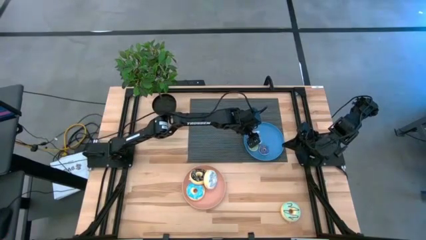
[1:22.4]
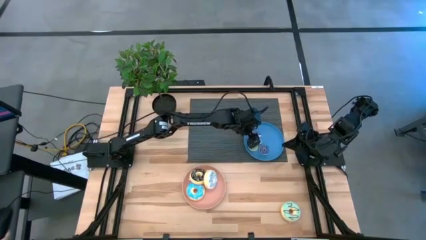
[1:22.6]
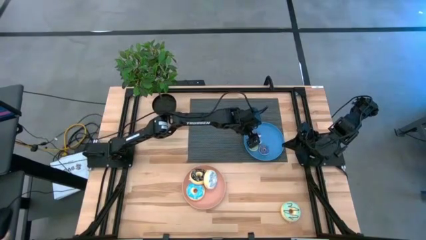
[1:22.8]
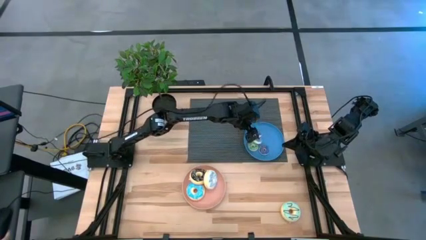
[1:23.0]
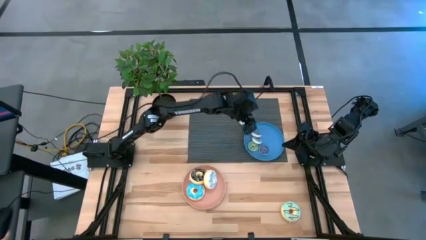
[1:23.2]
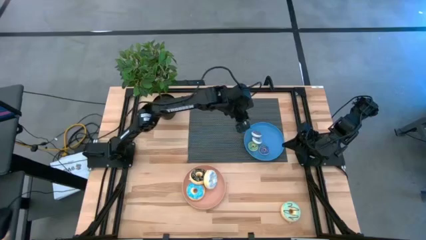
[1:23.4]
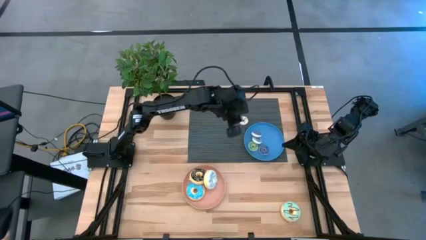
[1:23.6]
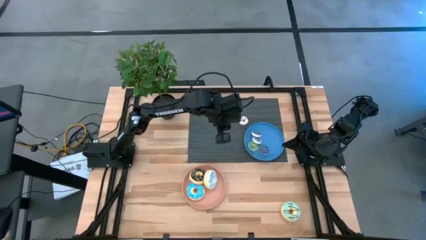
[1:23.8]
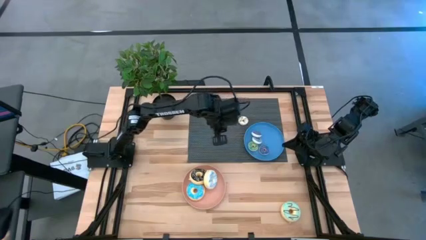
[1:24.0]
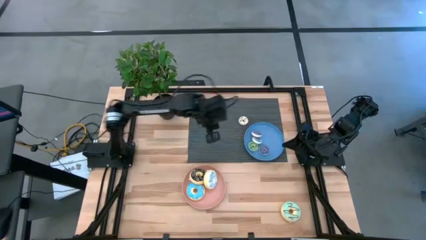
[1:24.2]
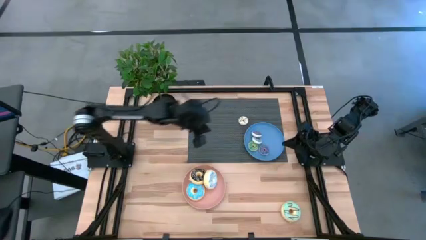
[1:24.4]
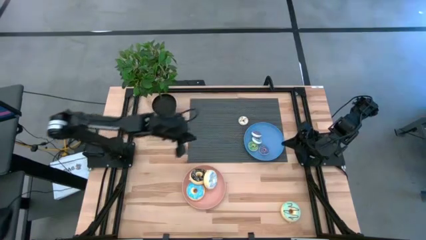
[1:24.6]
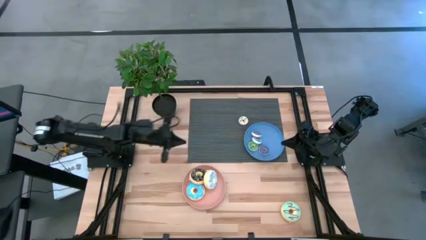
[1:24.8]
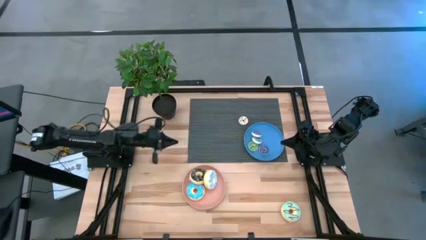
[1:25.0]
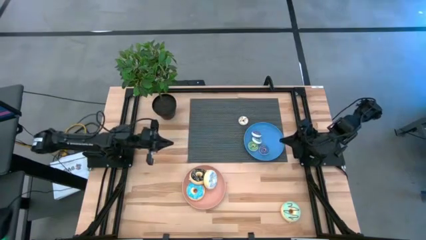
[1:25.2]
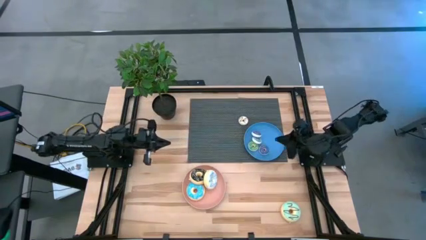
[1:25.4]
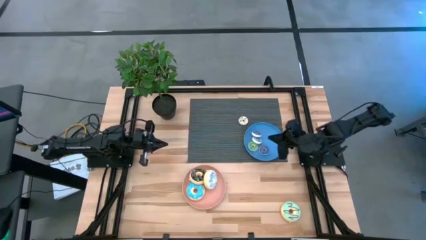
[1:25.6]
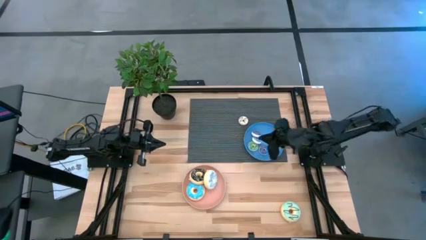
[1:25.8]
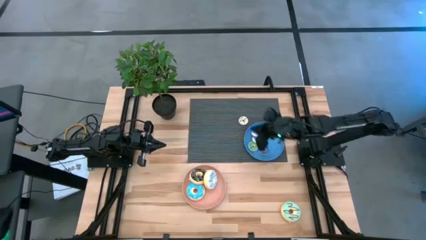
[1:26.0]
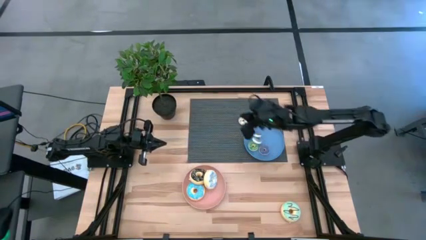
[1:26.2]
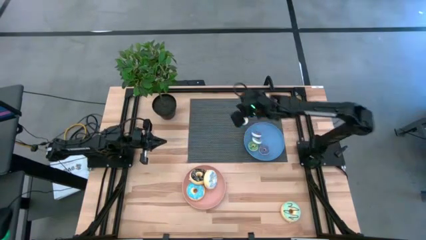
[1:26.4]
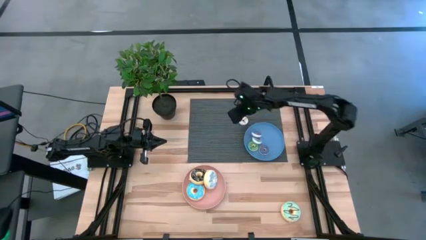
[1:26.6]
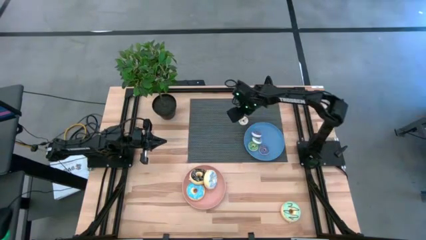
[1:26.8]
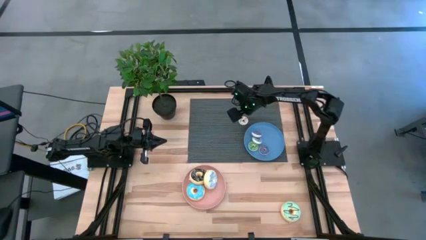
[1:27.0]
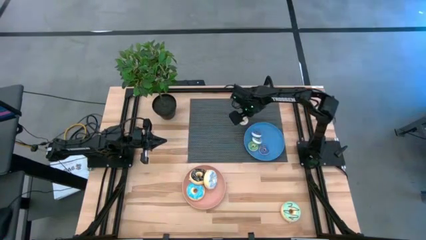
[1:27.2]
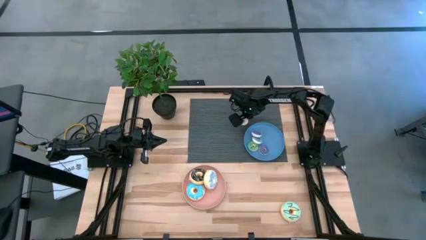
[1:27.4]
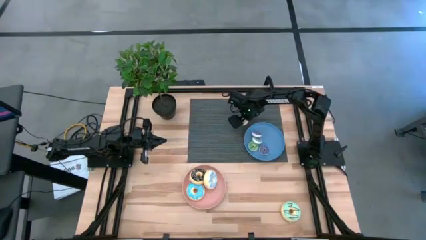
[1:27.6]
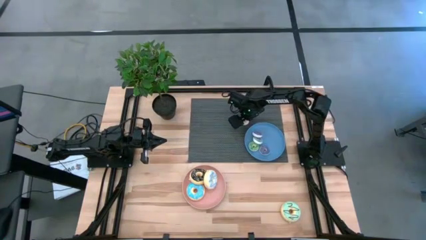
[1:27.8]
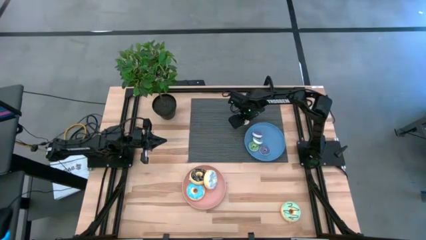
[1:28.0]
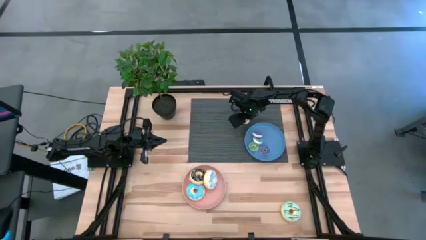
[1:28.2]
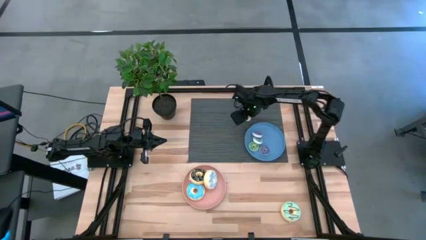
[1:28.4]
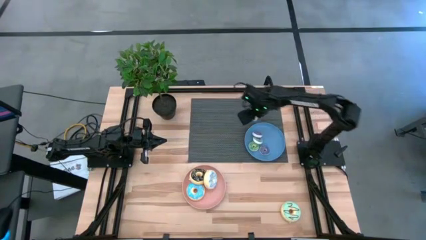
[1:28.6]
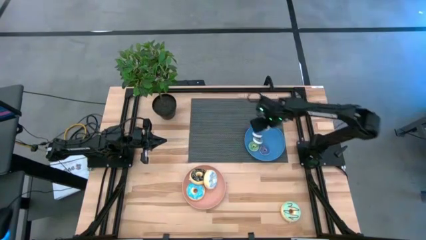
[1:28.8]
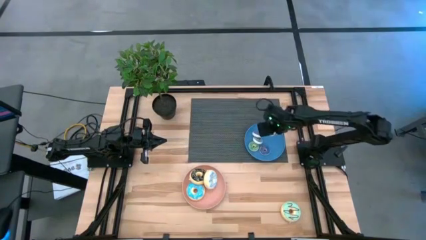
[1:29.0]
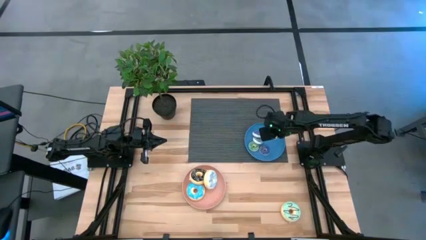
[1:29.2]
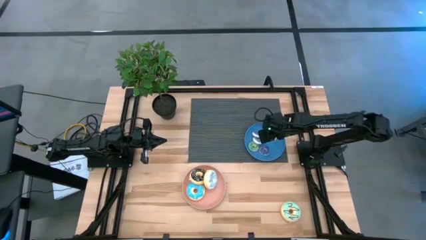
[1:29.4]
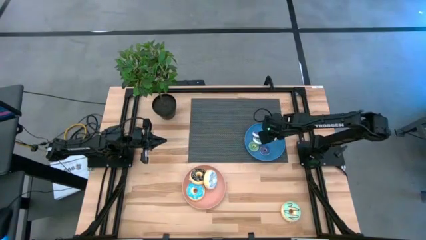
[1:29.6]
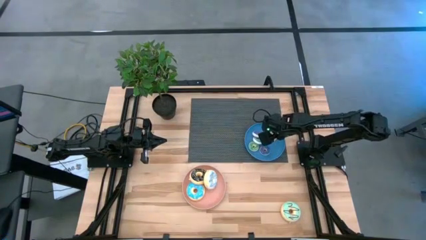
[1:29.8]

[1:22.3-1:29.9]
Task: Pick & Place donuts
Put the small white donut onto the blue plate

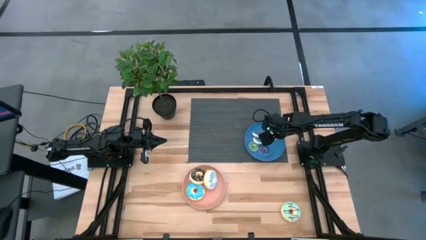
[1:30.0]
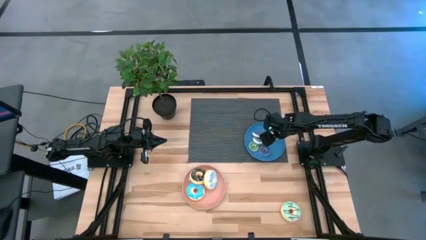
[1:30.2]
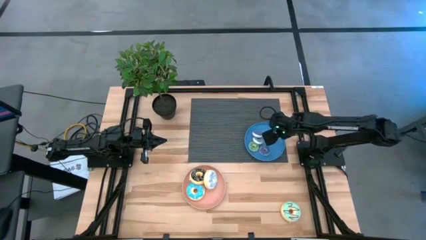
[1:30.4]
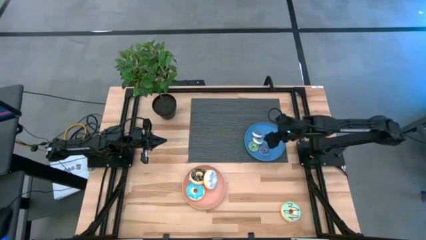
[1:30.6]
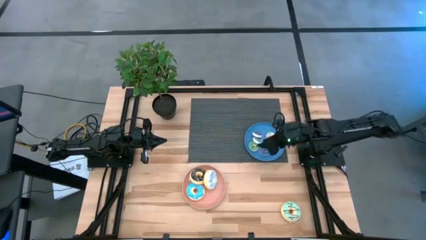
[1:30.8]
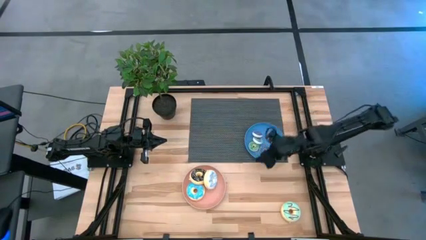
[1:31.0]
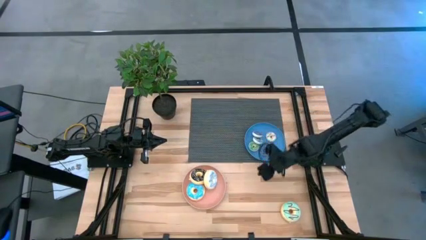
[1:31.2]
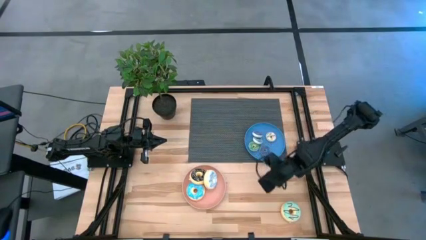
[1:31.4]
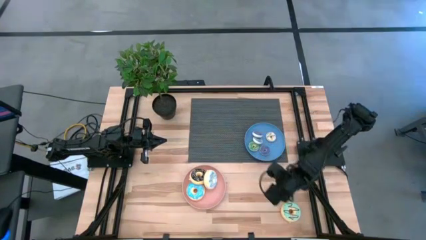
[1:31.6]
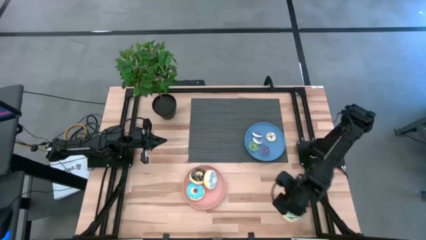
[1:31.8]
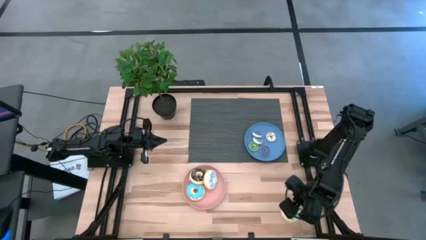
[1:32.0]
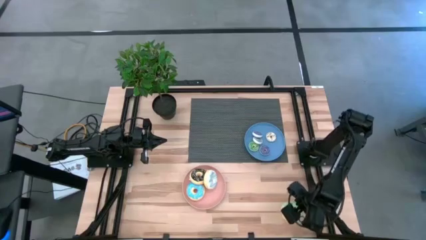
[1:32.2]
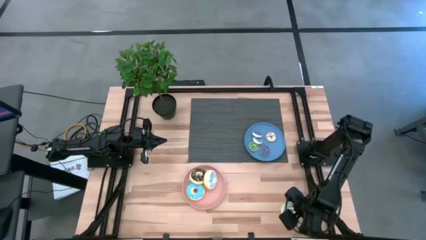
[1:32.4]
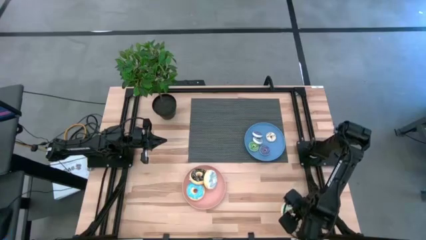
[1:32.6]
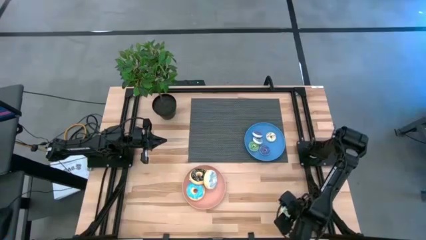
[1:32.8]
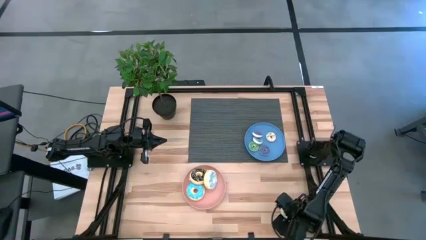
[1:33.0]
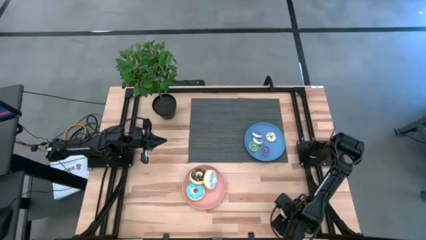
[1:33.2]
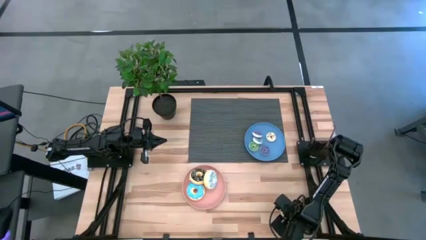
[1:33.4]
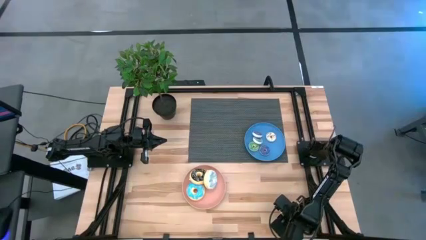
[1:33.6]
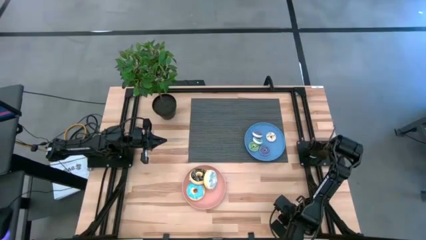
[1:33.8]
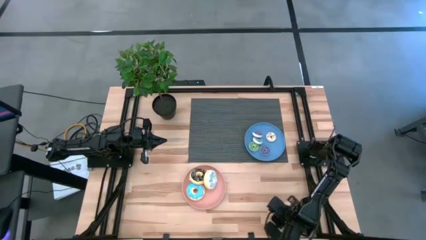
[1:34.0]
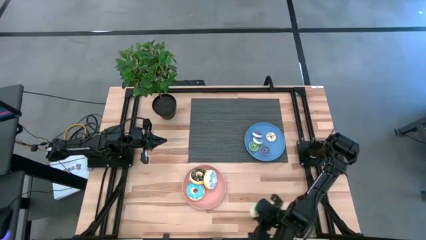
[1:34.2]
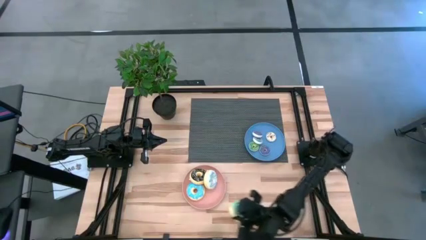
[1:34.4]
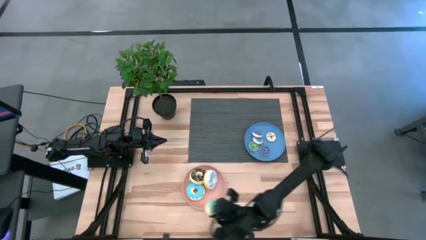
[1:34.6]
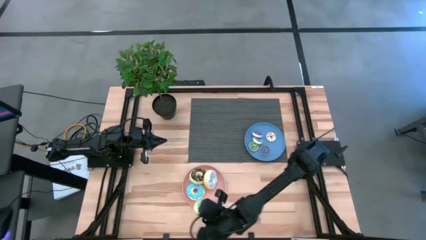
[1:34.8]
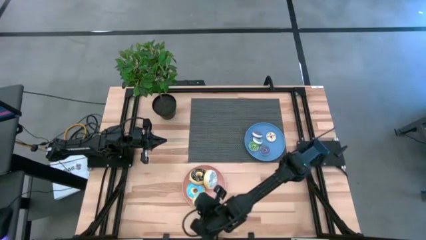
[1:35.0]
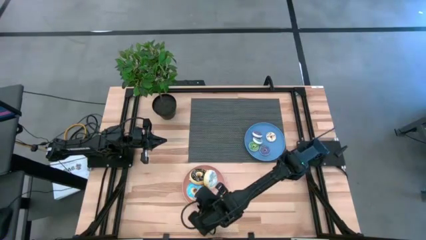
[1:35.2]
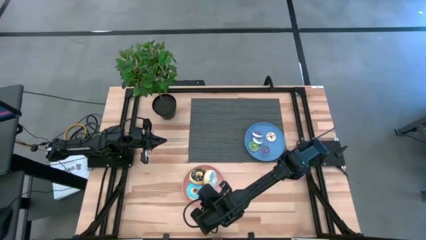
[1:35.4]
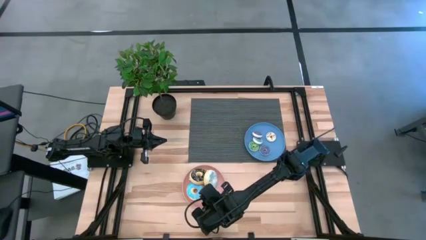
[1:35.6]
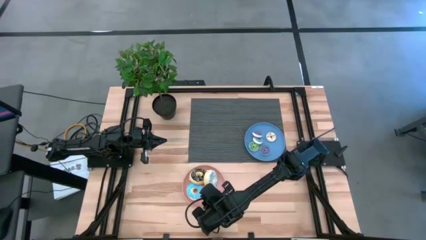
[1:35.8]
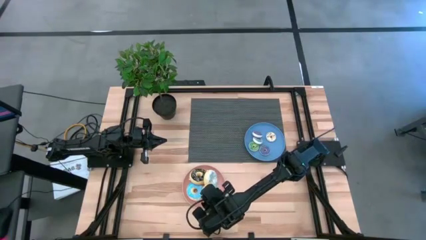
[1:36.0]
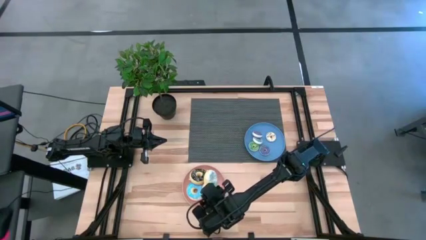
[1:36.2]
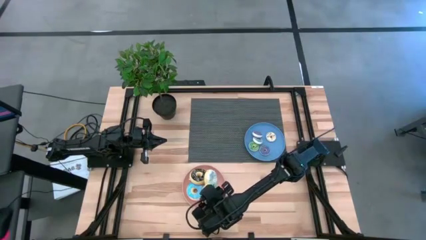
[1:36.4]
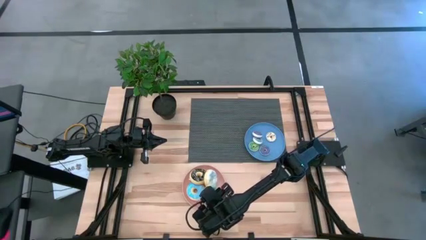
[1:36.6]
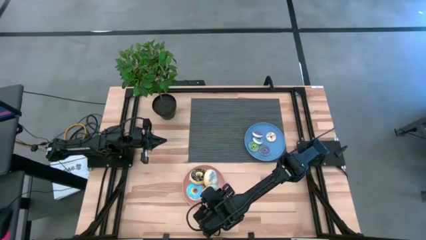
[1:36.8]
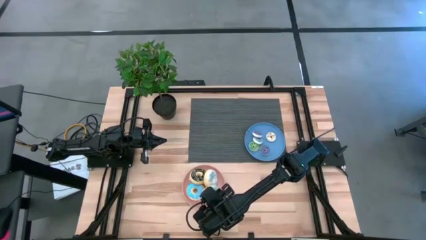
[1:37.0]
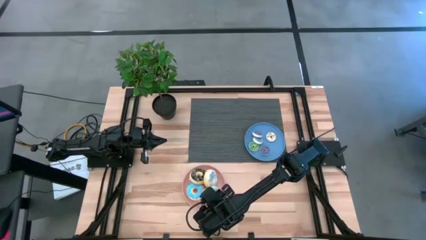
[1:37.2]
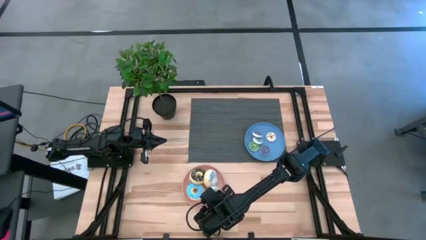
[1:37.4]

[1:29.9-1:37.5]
Put the large light blue donut onto the light orange plate
